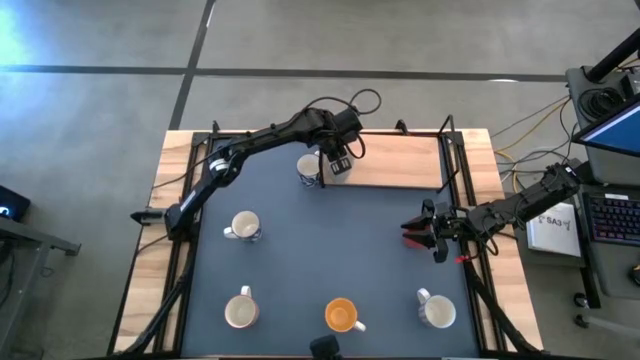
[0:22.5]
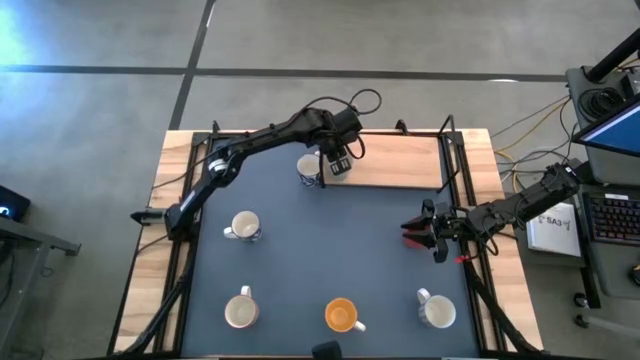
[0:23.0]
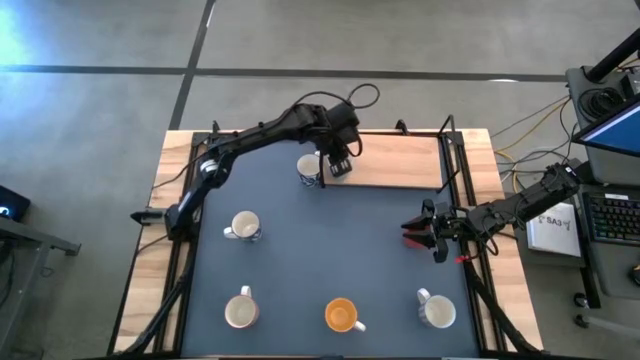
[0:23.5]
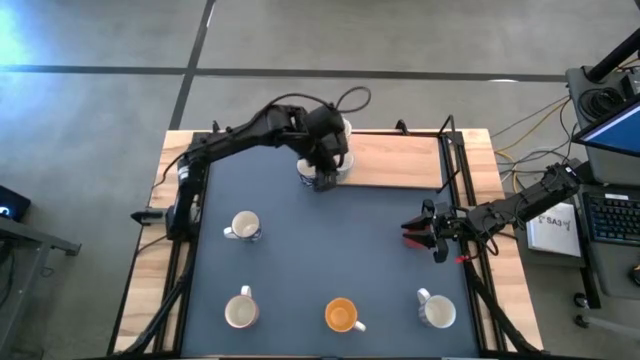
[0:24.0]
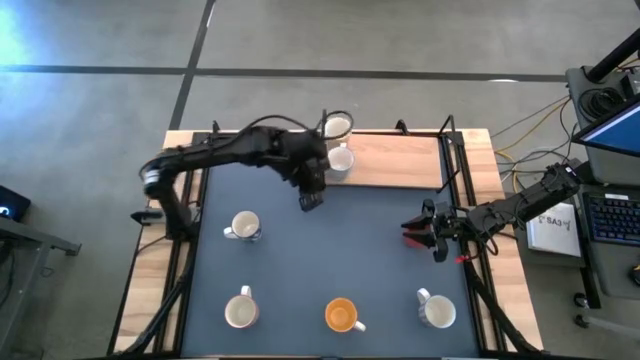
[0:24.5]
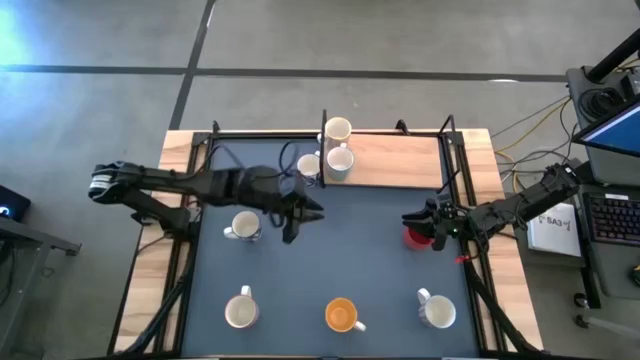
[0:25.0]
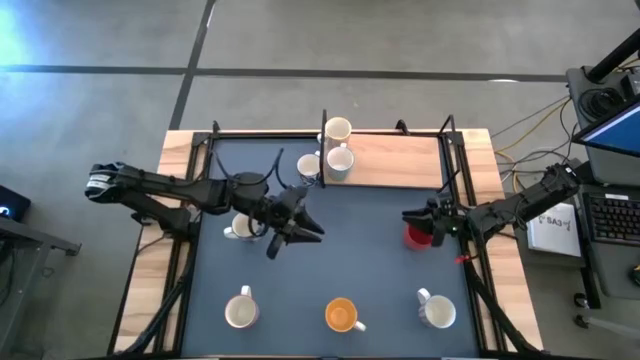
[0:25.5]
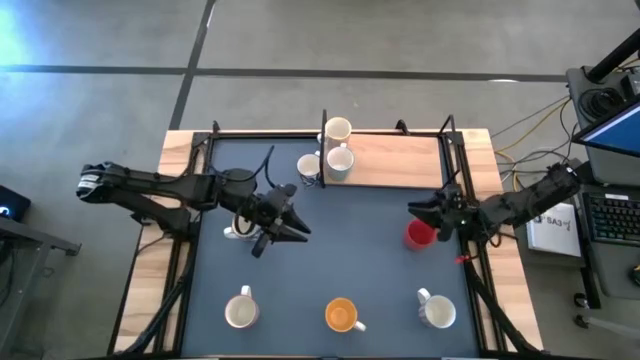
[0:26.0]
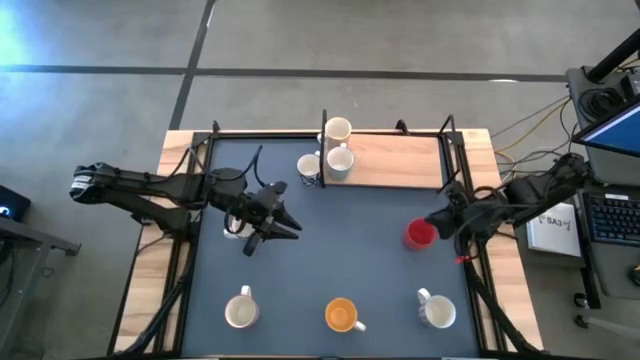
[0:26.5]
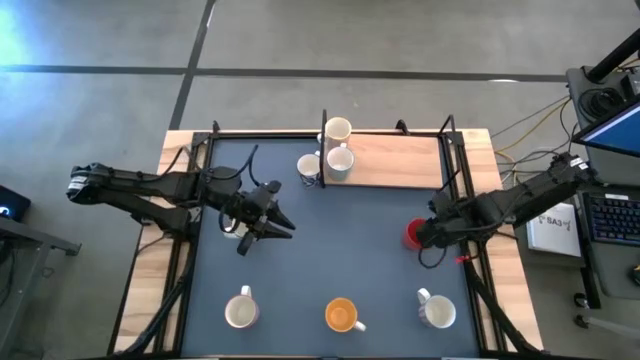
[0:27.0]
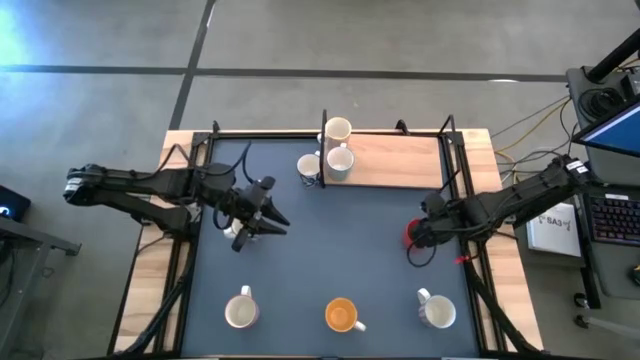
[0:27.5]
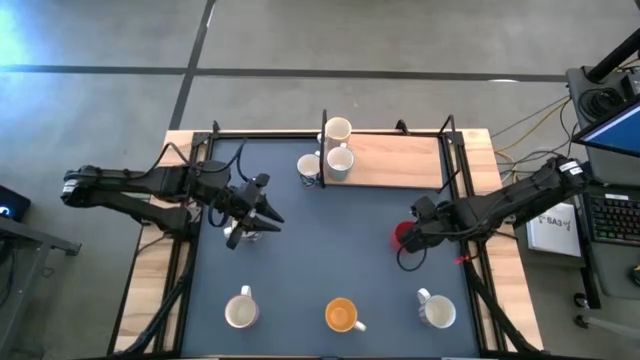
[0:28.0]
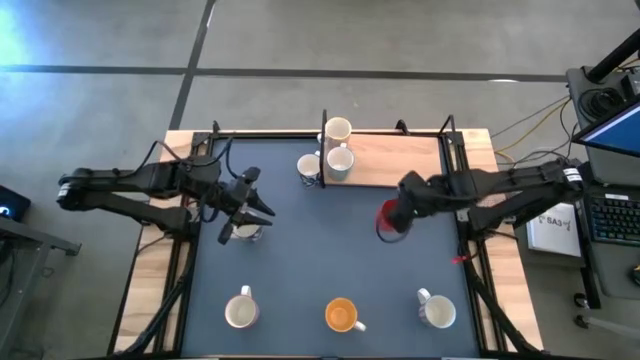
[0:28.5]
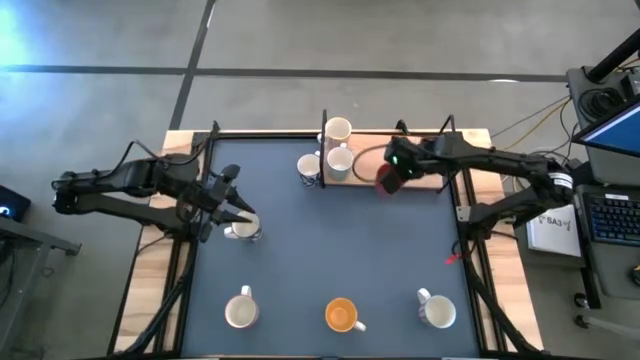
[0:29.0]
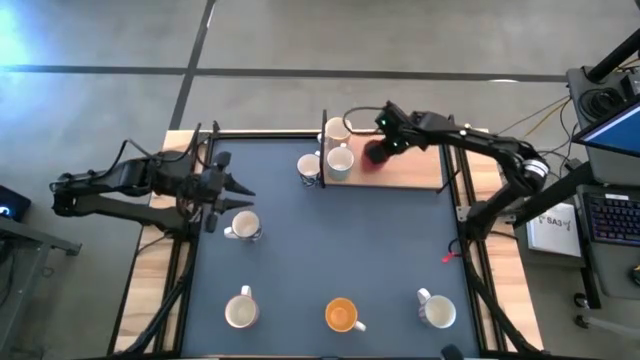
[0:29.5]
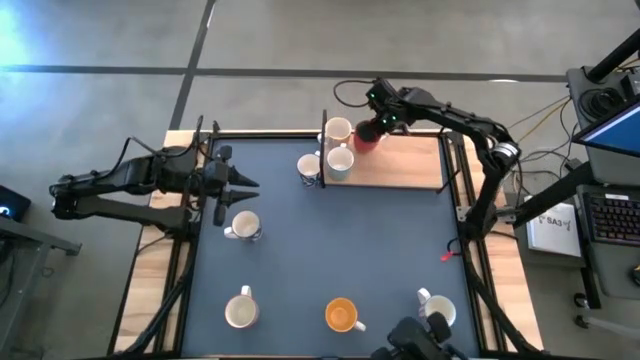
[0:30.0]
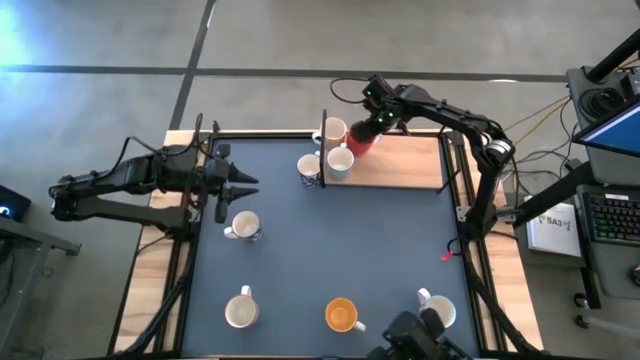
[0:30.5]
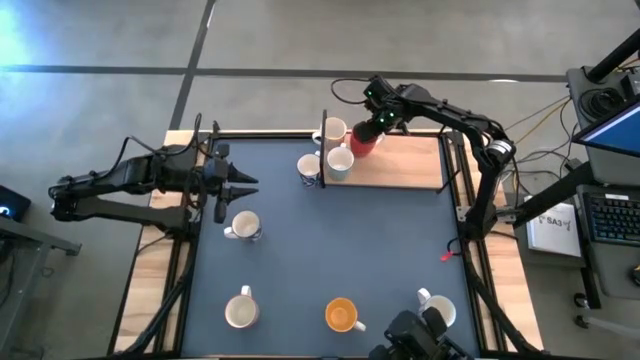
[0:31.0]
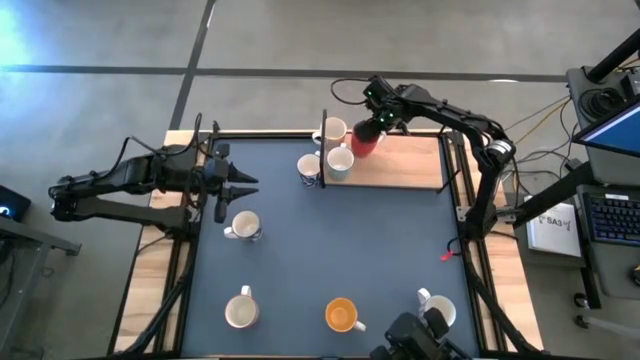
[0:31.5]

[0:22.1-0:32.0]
Task: Place coffee mugs
Put the red mug on the shelf

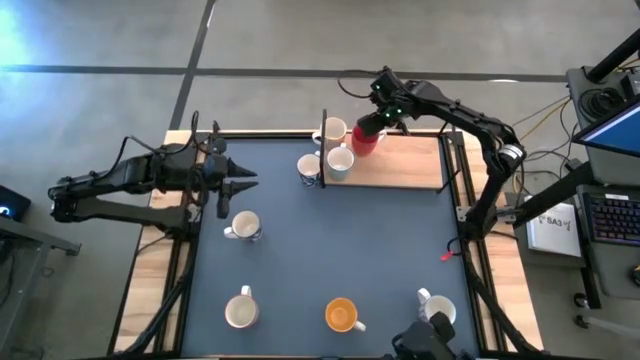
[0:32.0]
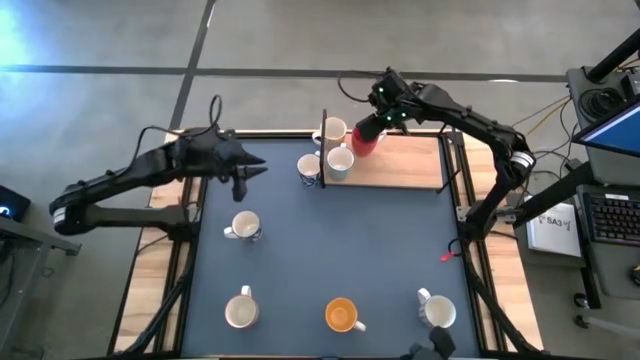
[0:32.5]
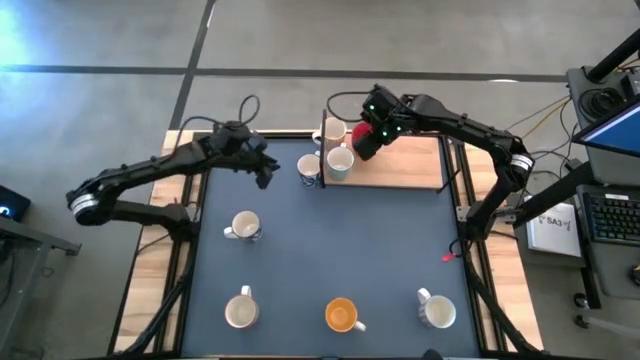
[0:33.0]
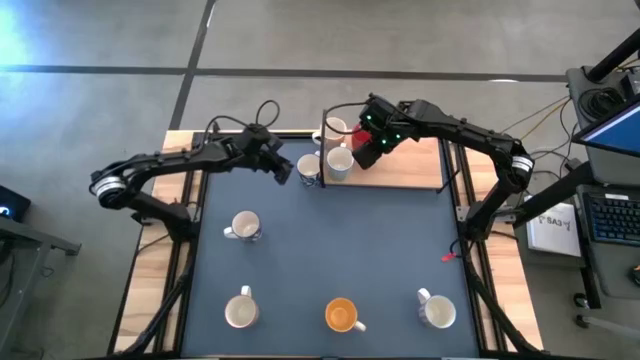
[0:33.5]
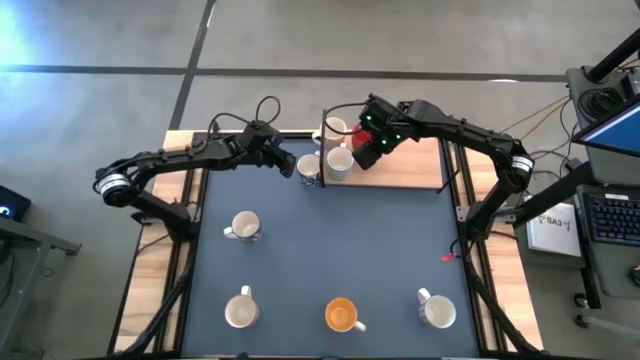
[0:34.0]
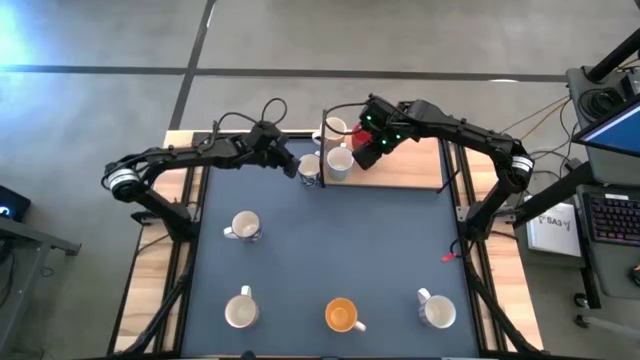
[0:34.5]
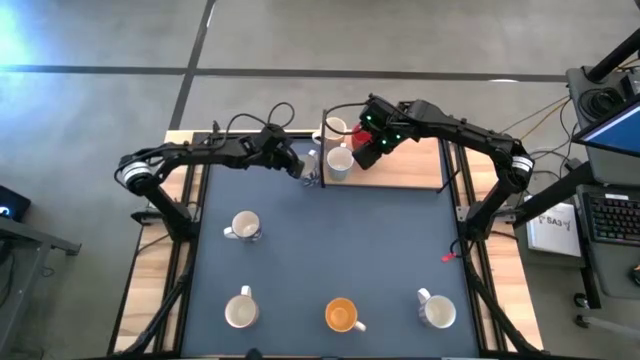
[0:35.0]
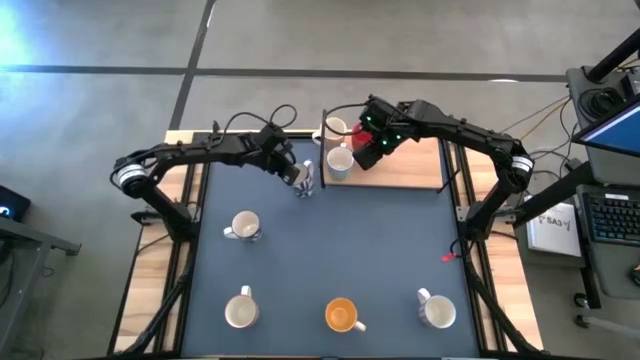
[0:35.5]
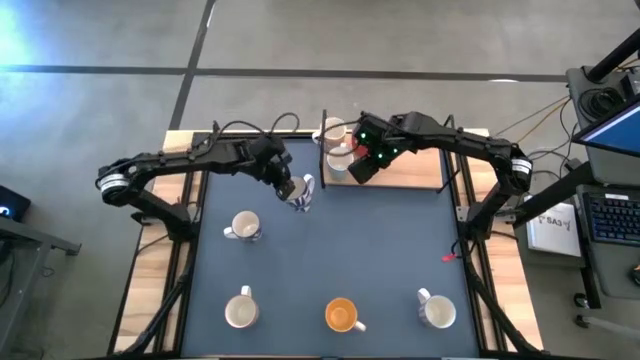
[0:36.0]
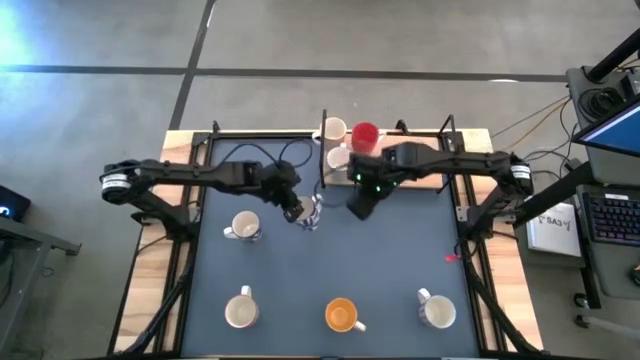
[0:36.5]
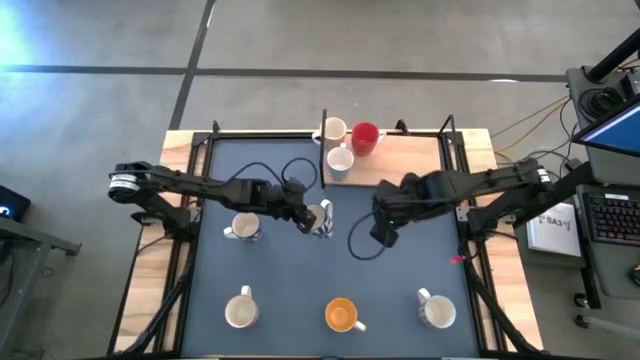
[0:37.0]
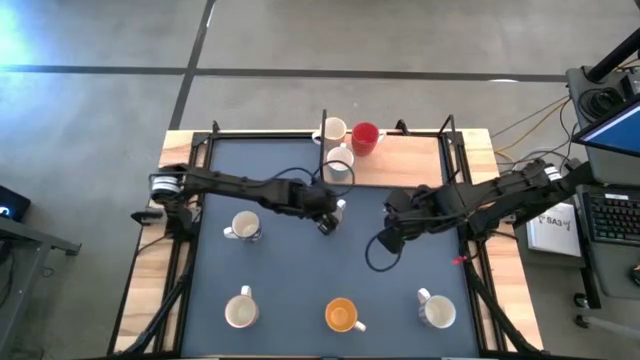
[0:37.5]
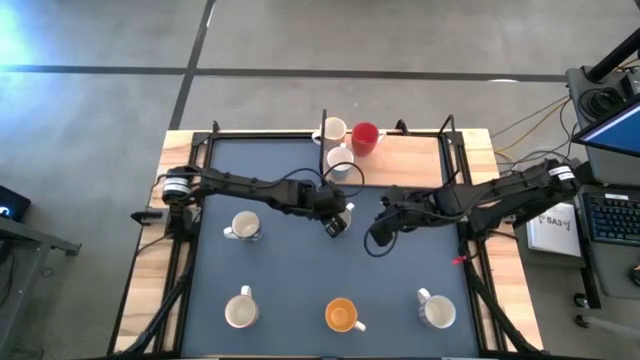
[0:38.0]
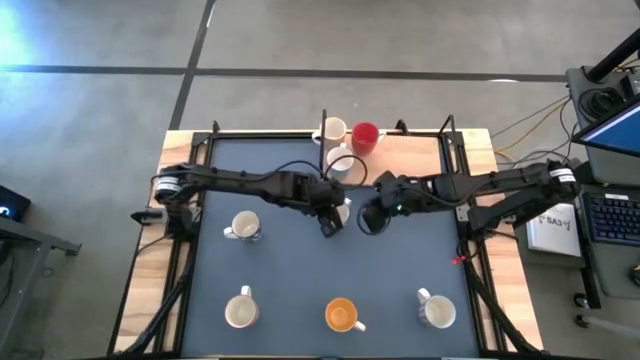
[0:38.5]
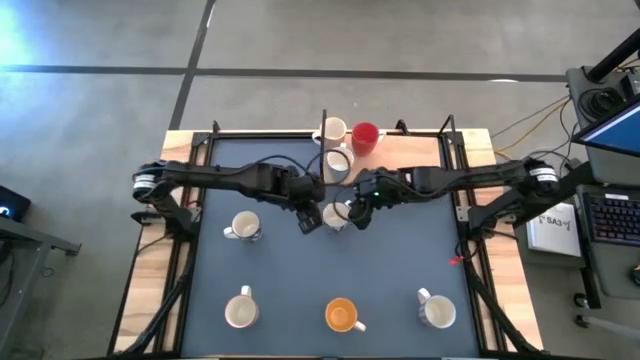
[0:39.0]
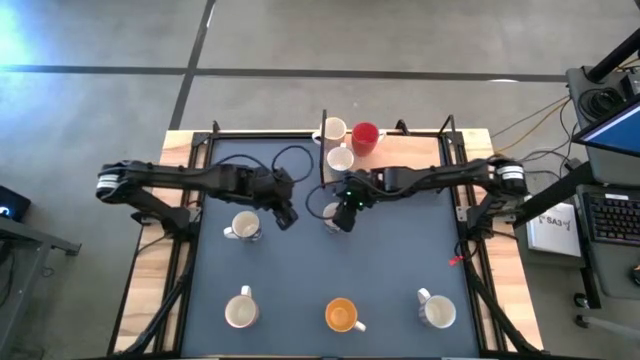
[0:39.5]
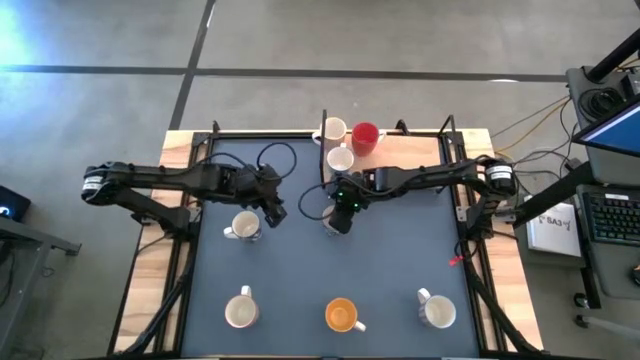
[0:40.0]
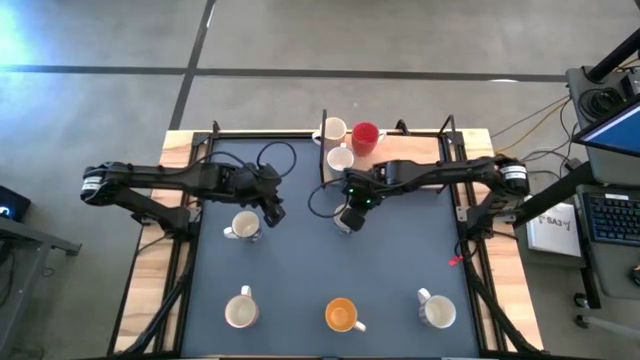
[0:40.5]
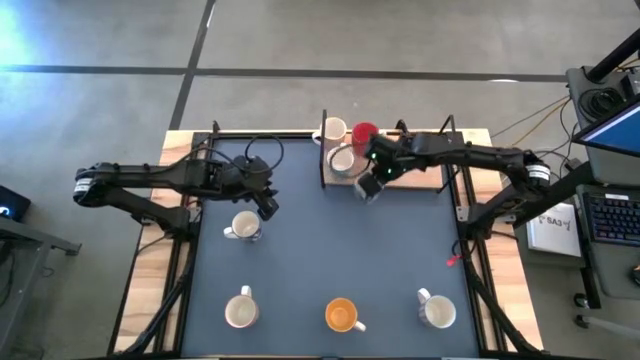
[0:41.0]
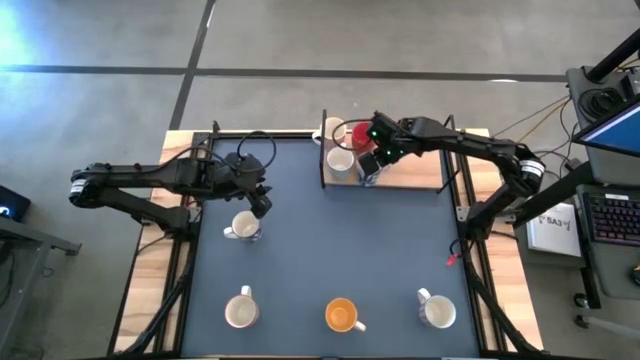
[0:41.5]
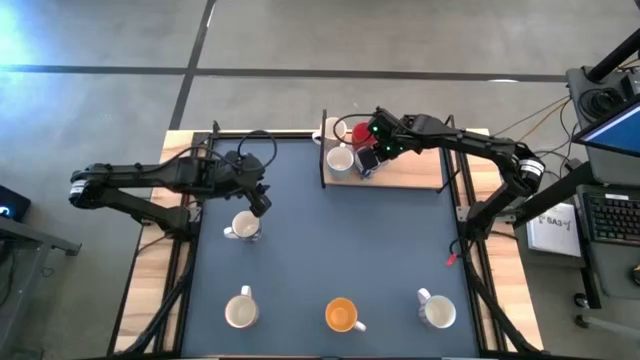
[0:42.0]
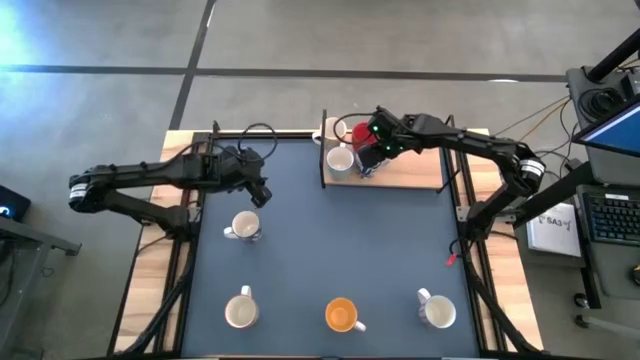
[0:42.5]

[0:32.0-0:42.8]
Put the top blue mug on the shelf
